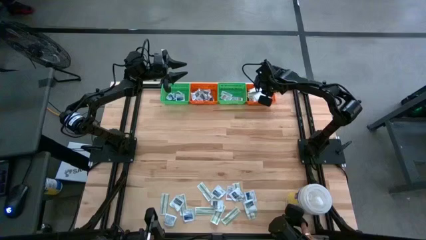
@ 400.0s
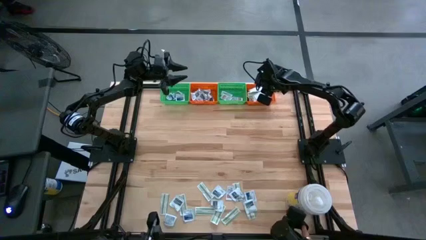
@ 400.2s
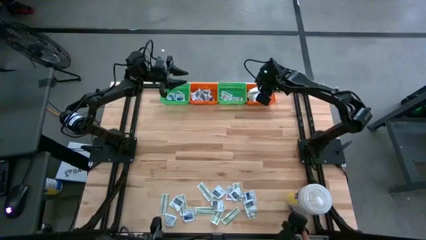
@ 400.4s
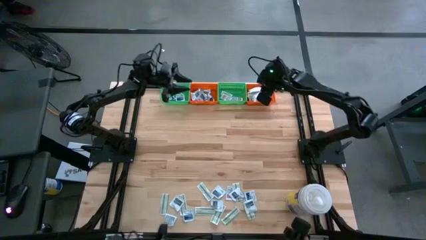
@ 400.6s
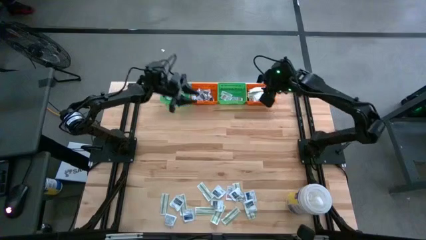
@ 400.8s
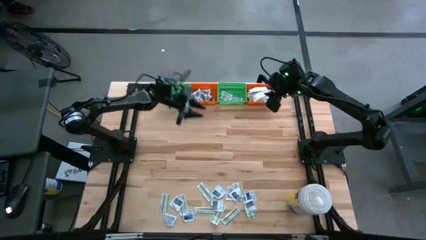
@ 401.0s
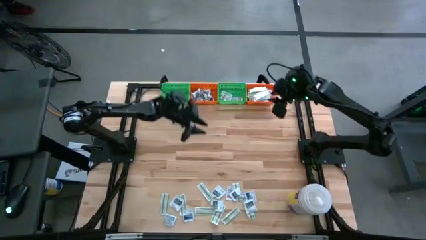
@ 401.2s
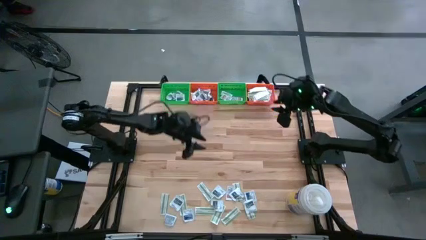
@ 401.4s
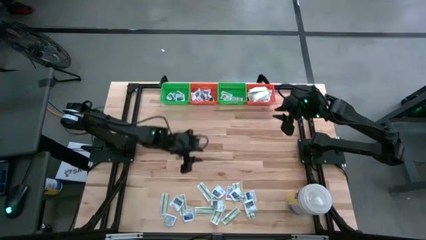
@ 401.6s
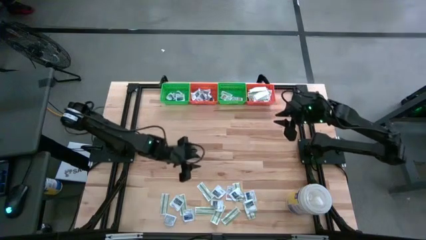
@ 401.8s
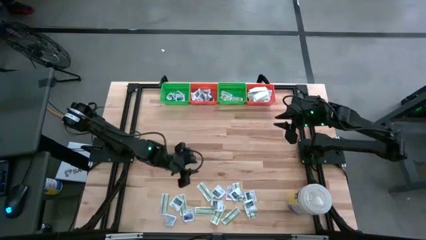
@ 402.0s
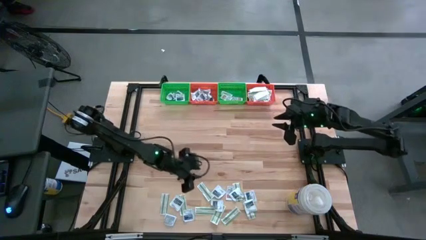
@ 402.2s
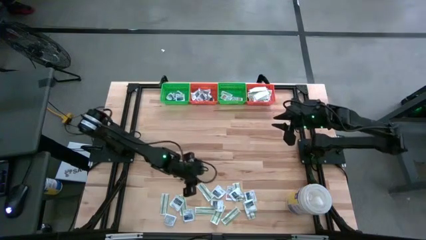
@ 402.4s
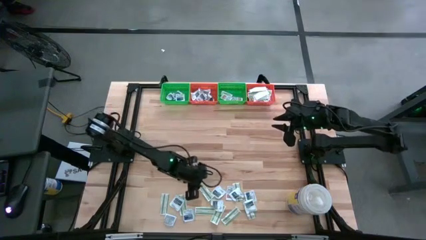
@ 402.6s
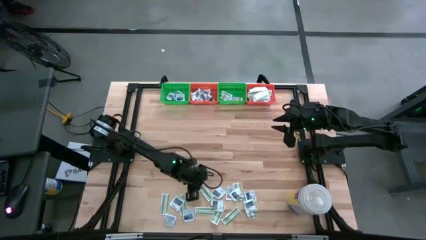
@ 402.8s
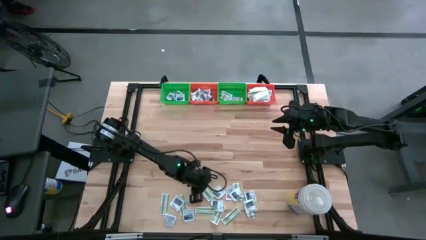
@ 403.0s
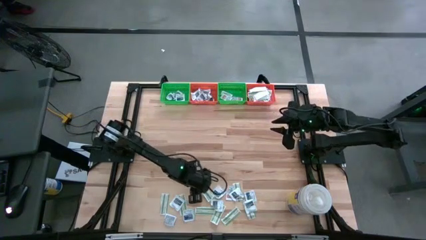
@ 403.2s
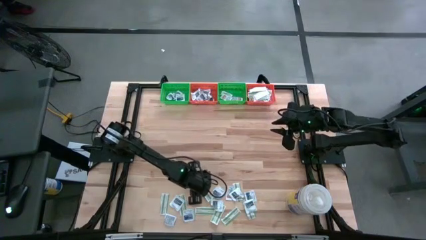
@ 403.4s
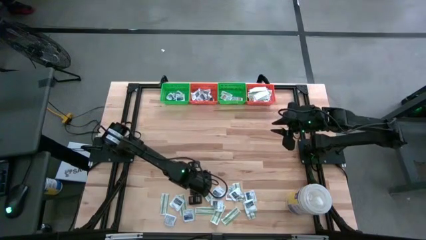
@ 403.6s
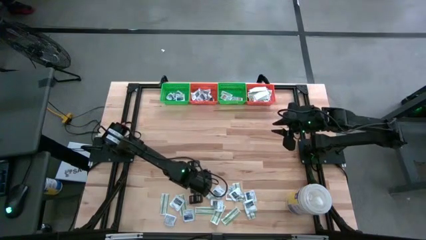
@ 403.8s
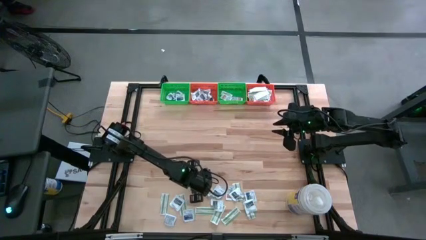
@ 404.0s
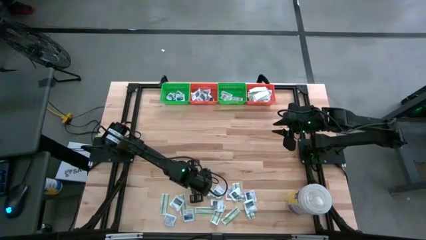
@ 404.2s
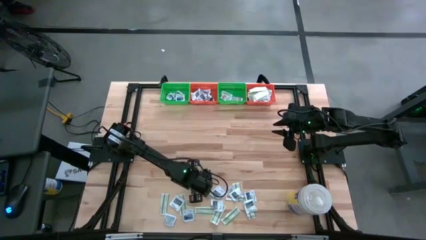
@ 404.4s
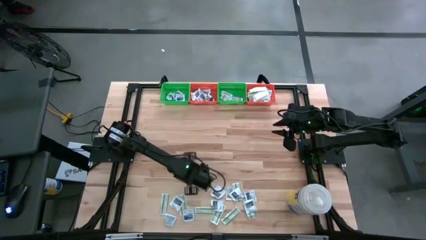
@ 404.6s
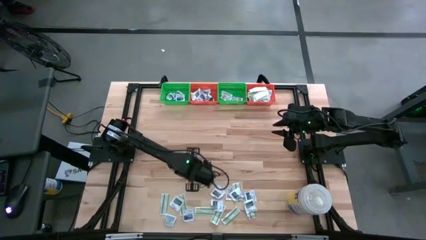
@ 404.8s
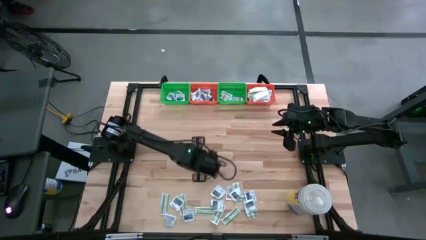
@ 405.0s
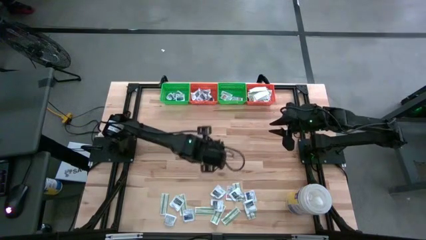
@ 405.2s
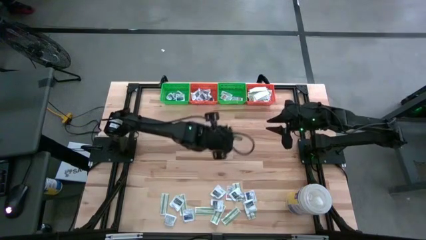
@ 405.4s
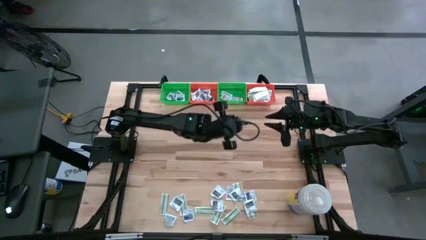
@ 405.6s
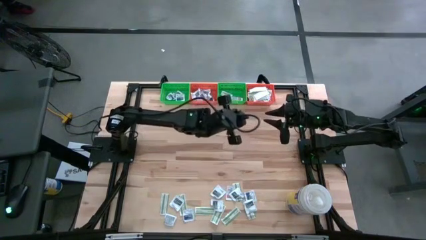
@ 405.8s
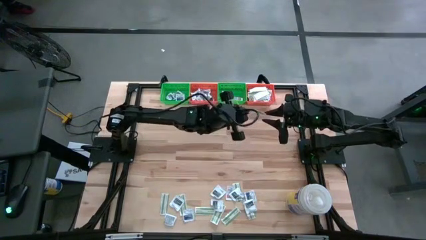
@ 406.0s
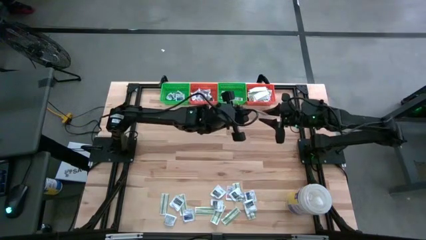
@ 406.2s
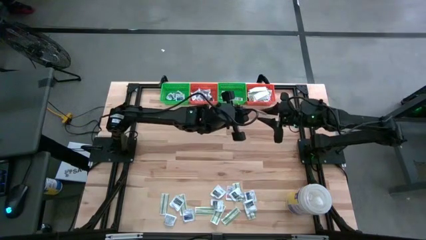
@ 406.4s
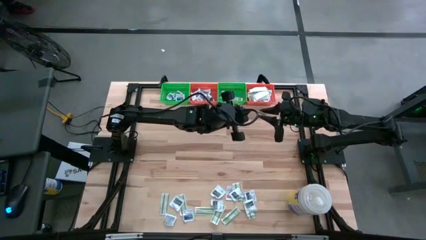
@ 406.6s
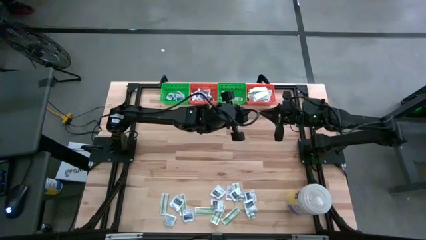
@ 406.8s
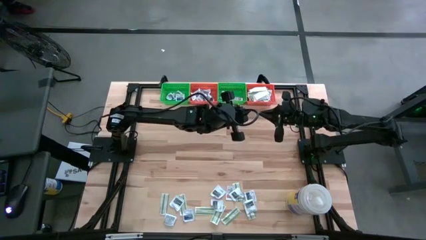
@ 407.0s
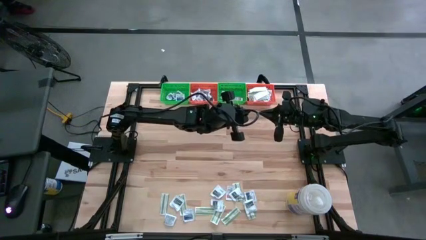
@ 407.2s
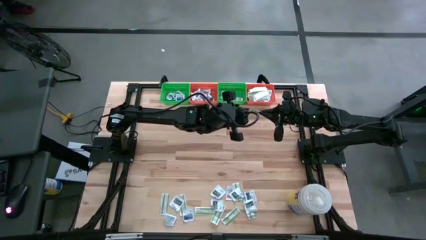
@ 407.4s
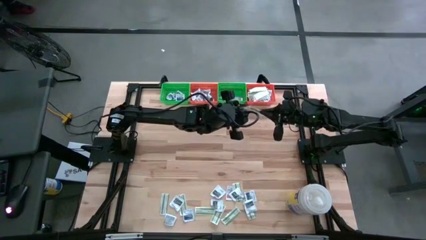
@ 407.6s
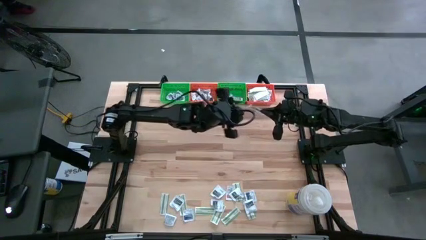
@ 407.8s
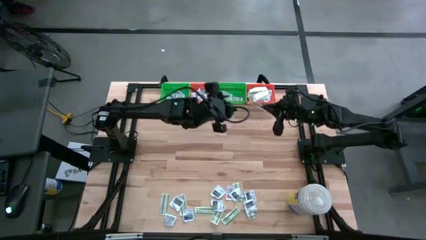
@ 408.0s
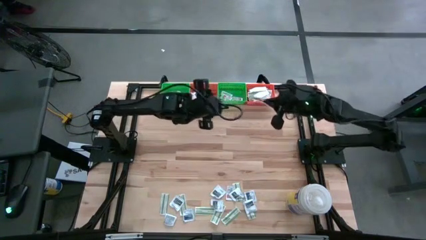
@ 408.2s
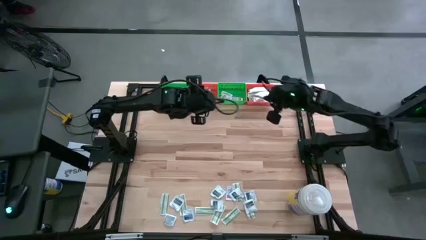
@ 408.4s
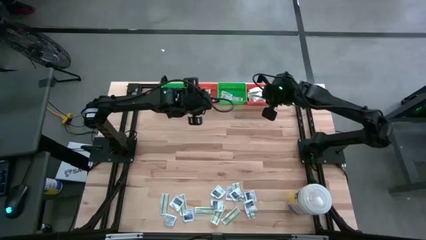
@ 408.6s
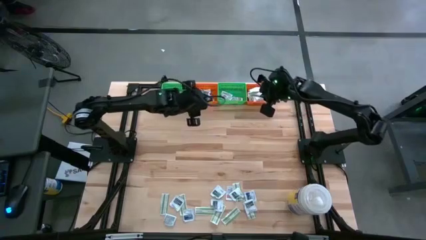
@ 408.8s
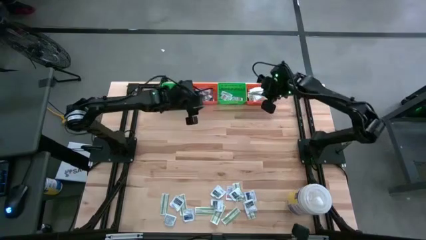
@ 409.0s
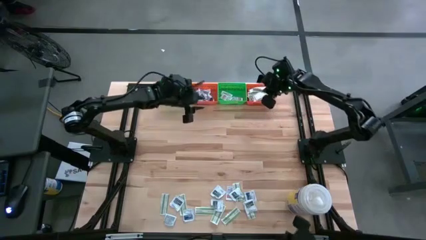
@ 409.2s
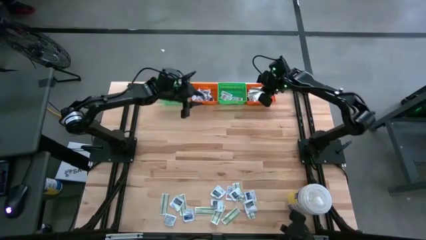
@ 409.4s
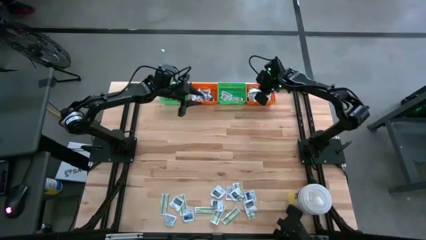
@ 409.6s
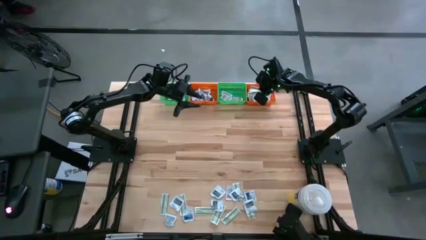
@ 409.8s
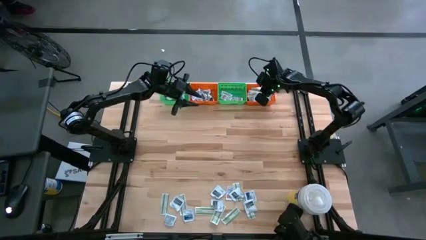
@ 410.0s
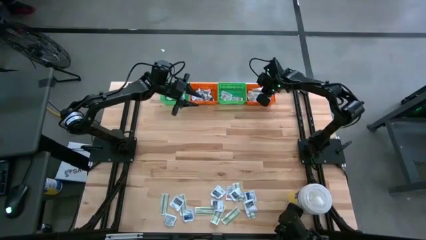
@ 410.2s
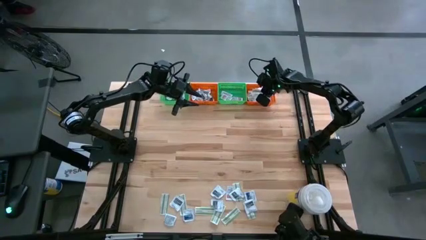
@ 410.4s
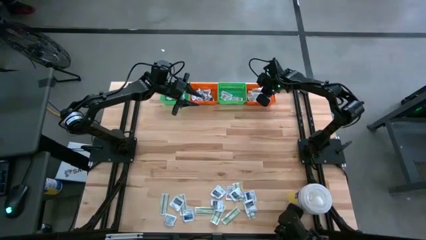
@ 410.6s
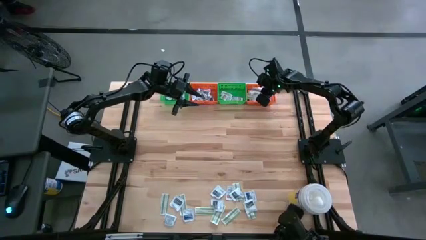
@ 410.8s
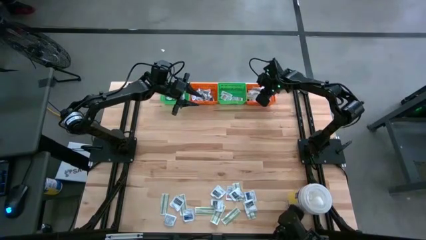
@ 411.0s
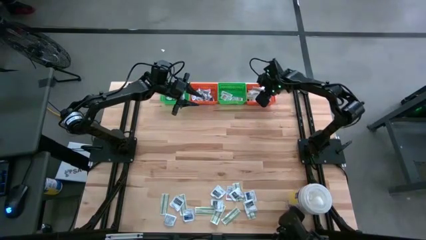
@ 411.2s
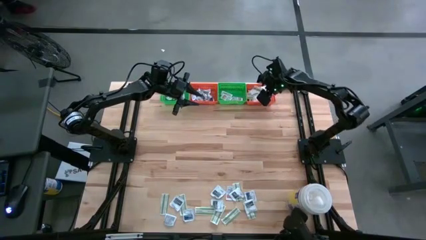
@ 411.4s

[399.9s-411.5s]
Task: Pick & Place First Aid Supplies
Put the green bandage pack in the right orange bin

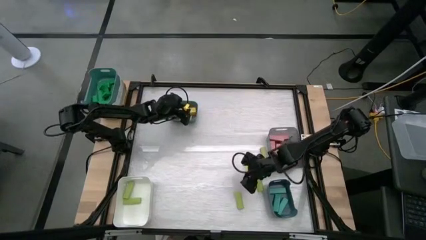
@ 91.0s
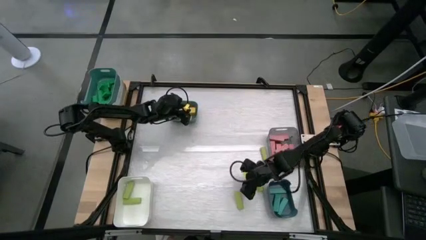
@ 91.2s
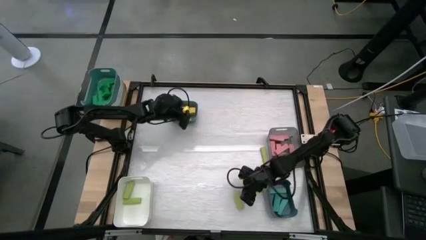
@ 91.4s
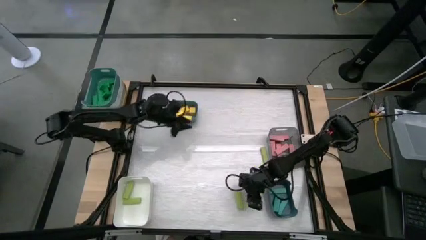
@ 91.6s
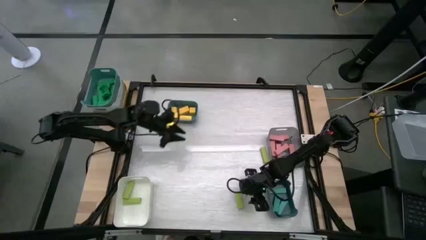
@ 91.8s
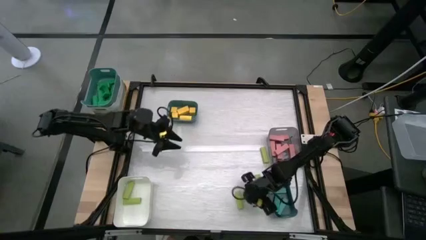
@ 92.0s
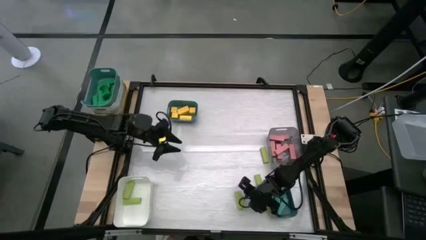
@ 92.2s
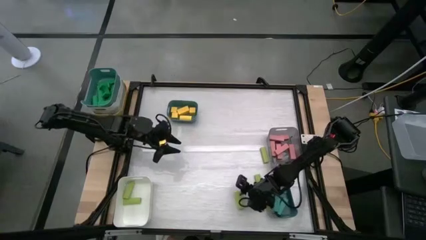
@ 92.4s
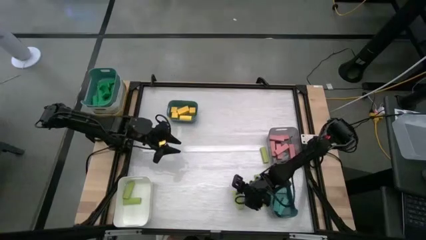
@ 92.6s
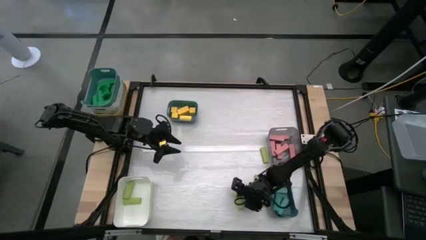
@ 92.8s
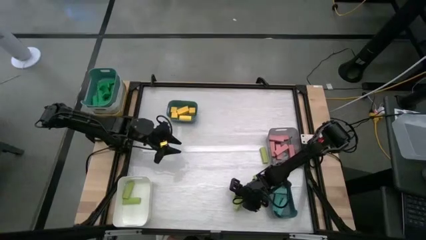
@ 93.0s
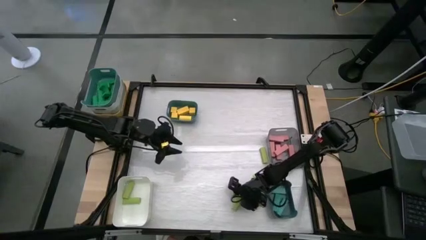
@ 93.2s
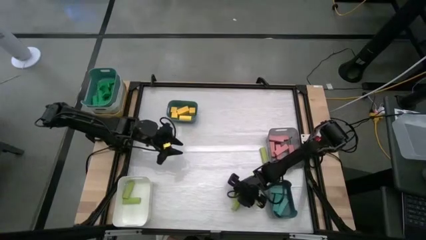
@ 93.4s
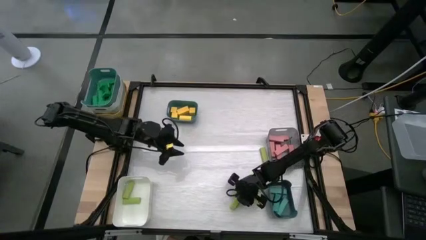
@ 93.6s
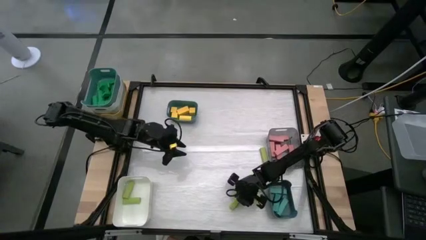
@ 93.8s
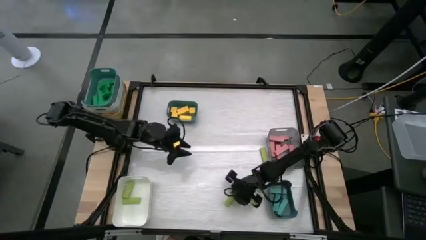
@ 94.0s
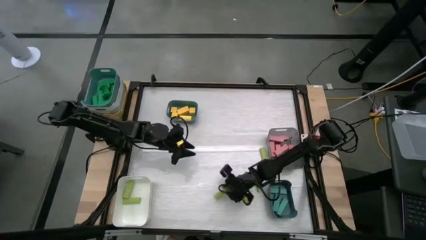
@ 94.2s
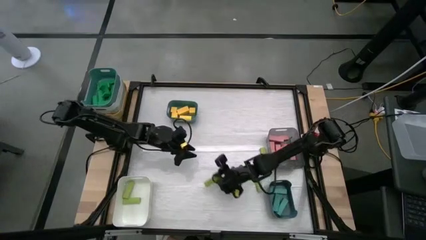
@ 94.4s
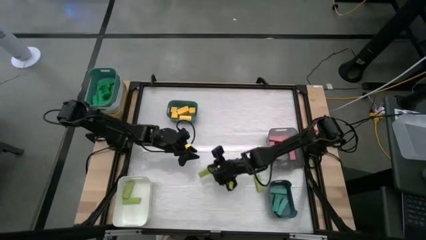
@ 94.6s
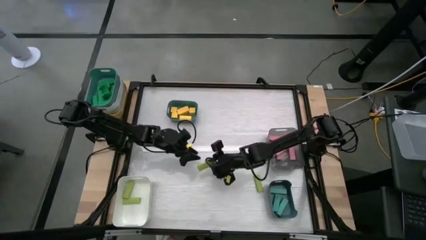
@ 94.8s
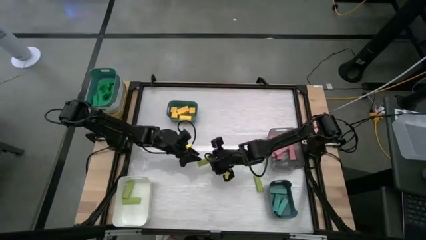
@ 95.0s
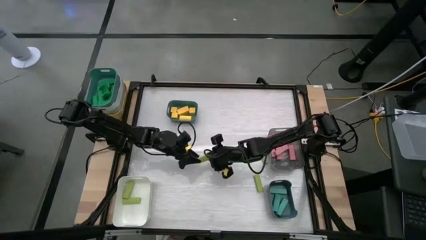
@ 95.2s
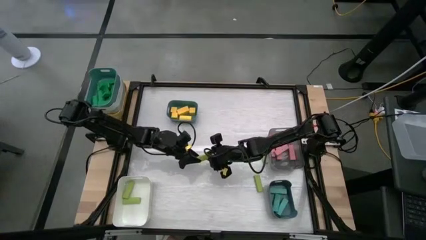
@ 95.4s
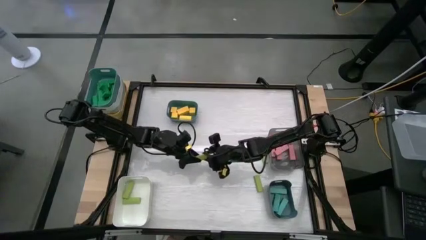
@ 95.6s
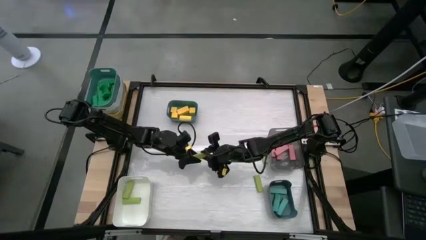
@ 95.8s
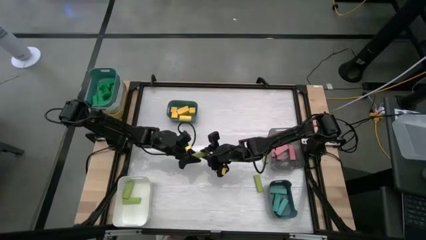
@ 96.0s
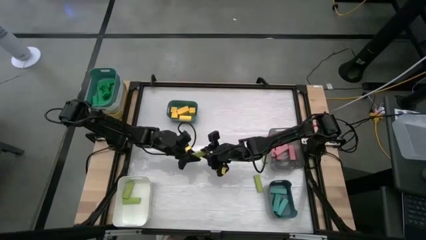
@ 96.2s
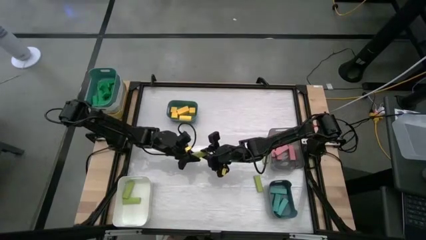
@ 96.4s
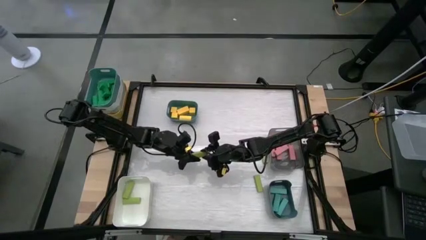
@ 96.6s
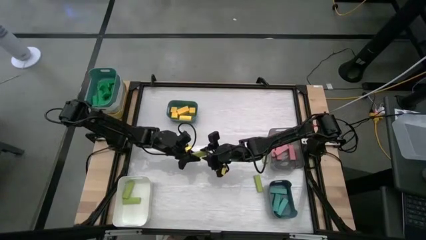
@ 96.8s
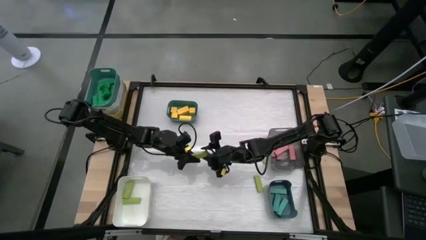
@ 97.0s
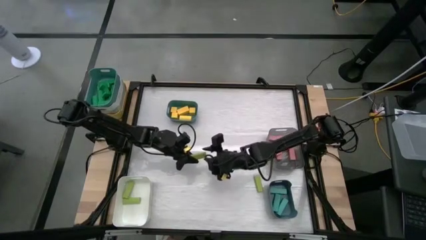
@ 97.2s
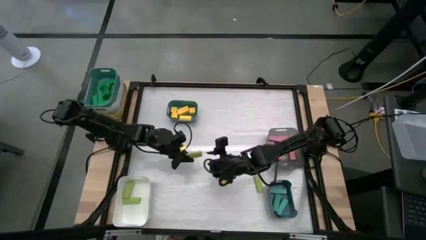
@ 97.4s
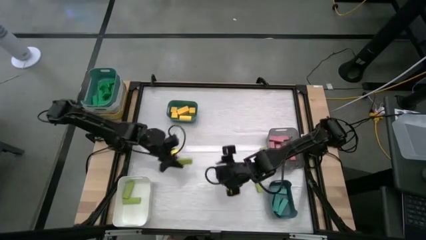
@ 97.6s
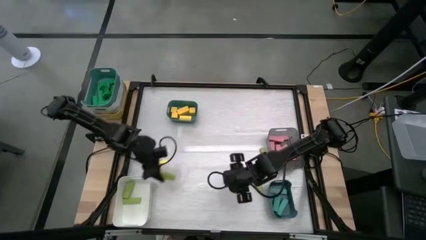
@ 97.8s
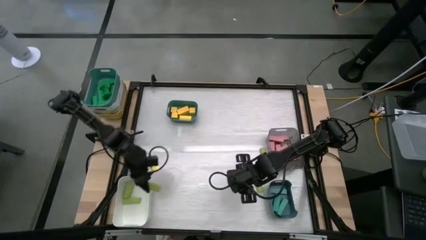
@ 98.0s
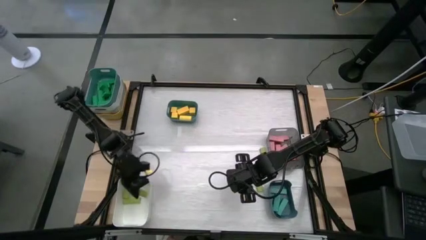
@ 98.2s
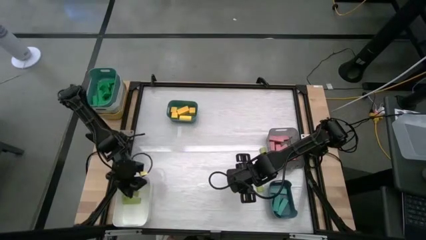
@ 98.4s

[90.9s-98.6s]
Task: Sort blocks
Put the green block into the white bin
